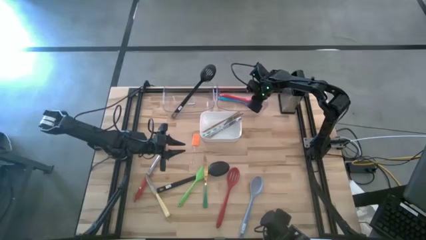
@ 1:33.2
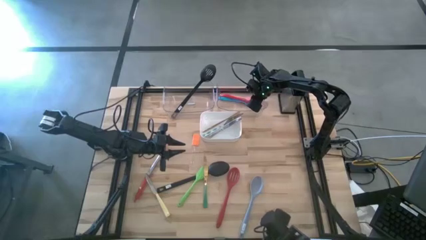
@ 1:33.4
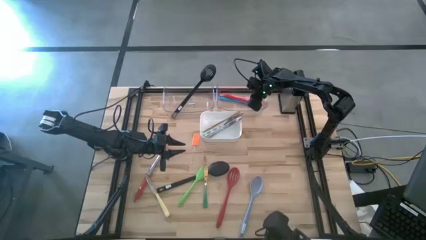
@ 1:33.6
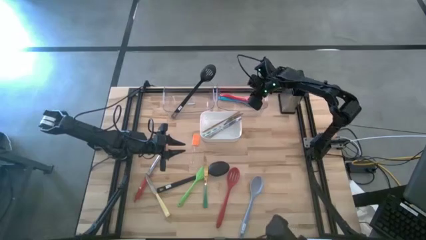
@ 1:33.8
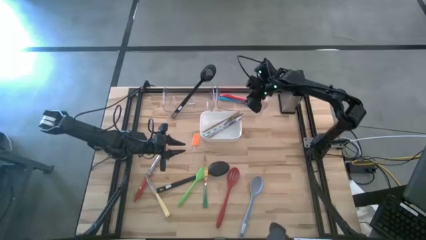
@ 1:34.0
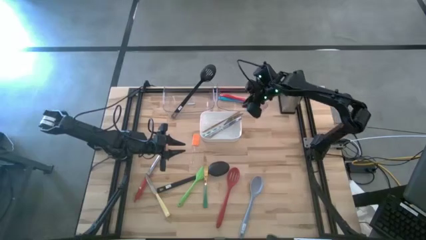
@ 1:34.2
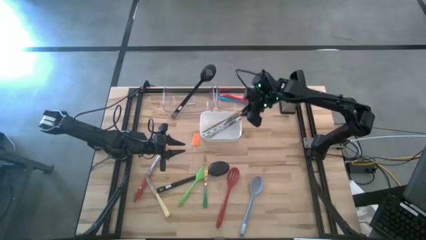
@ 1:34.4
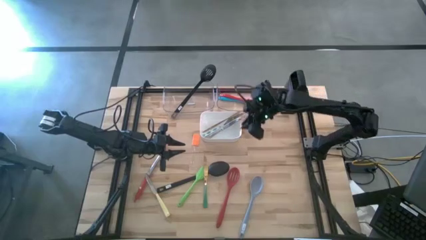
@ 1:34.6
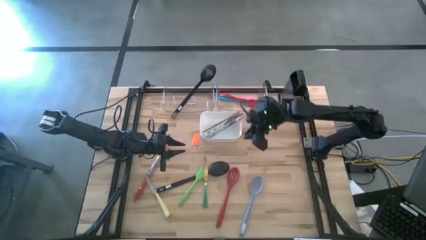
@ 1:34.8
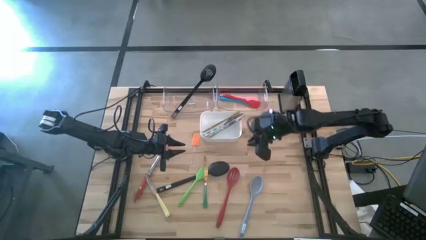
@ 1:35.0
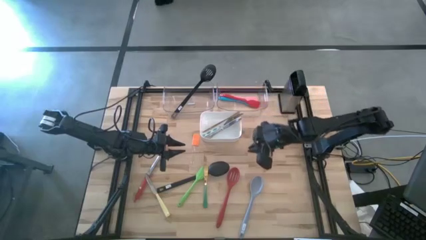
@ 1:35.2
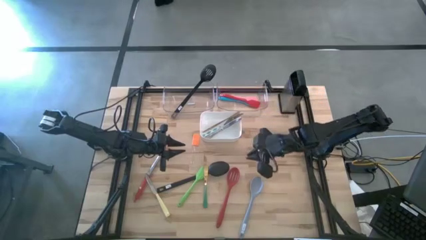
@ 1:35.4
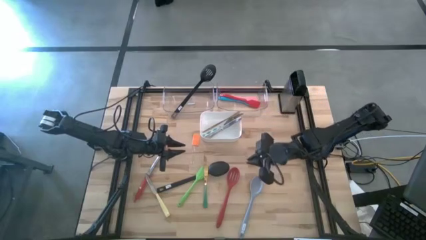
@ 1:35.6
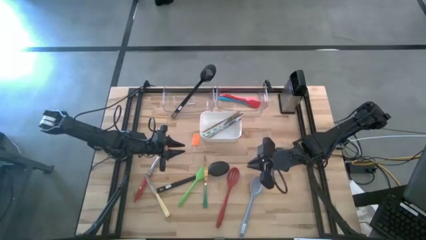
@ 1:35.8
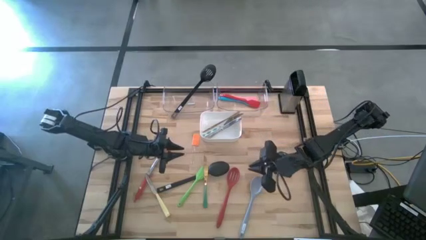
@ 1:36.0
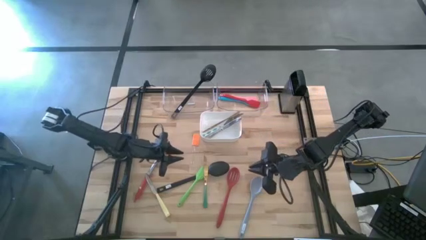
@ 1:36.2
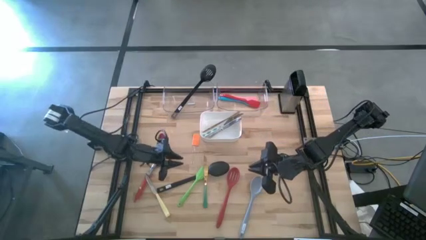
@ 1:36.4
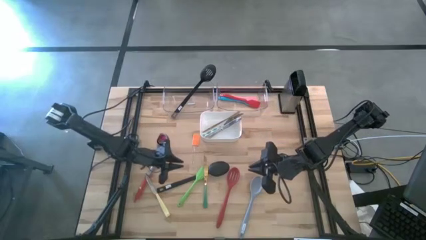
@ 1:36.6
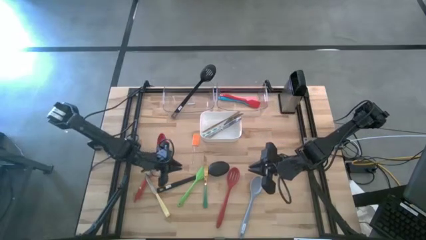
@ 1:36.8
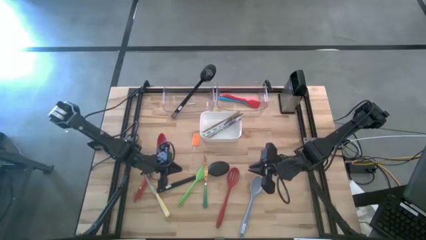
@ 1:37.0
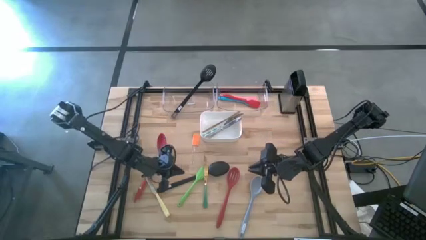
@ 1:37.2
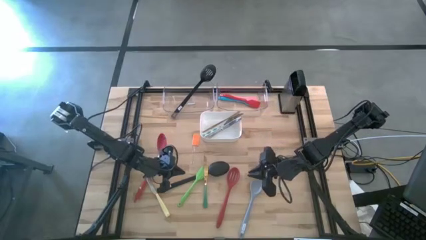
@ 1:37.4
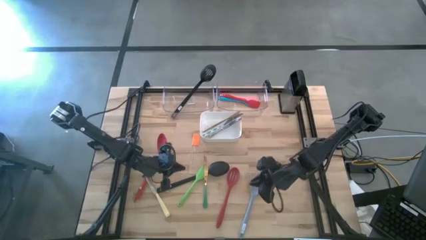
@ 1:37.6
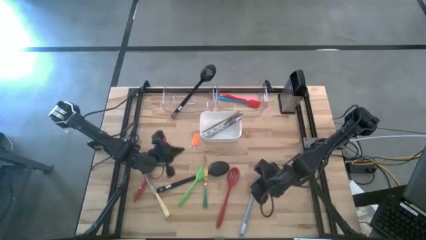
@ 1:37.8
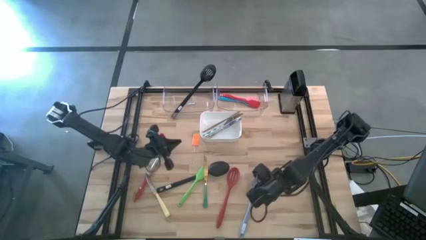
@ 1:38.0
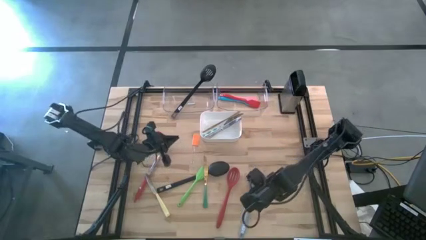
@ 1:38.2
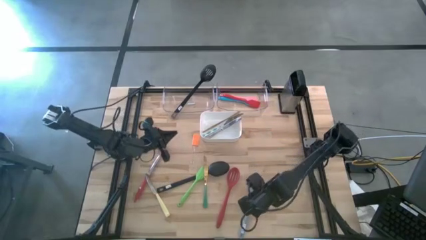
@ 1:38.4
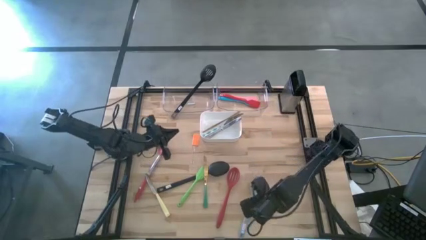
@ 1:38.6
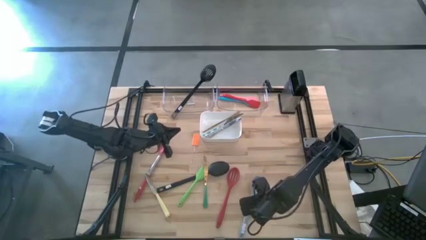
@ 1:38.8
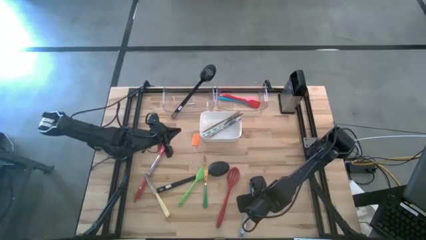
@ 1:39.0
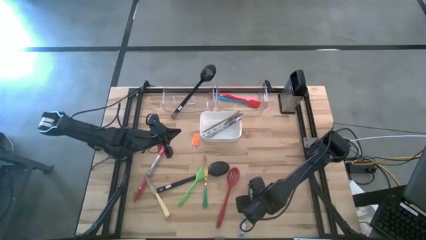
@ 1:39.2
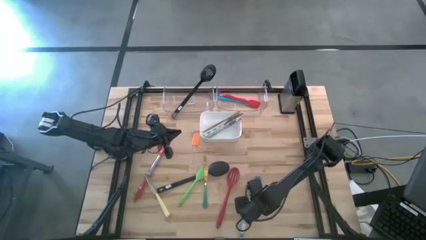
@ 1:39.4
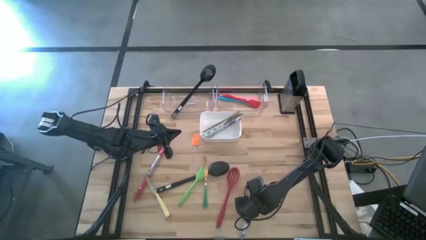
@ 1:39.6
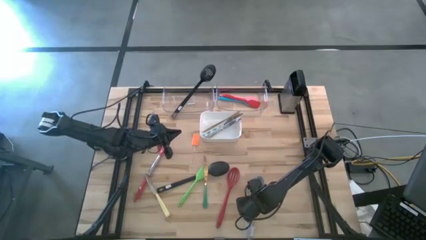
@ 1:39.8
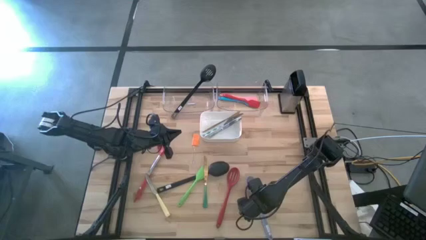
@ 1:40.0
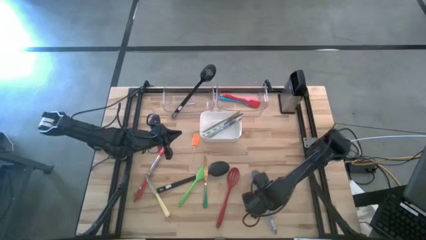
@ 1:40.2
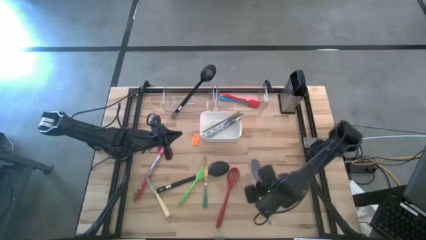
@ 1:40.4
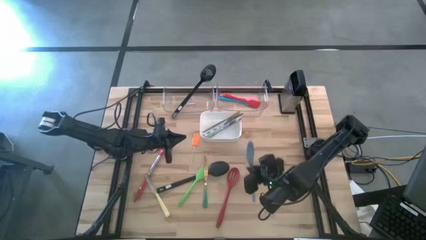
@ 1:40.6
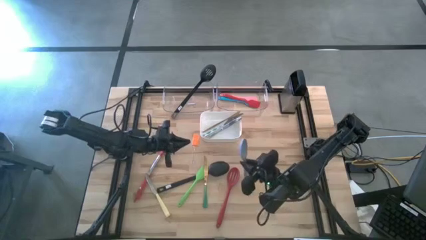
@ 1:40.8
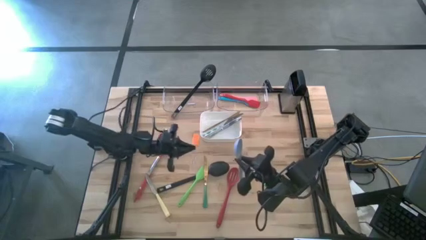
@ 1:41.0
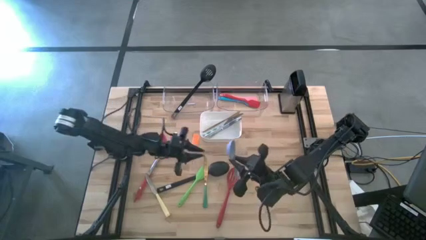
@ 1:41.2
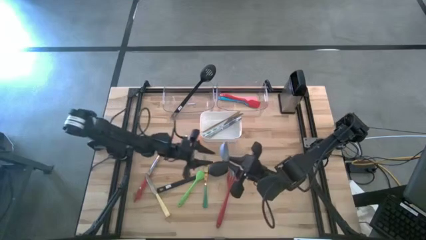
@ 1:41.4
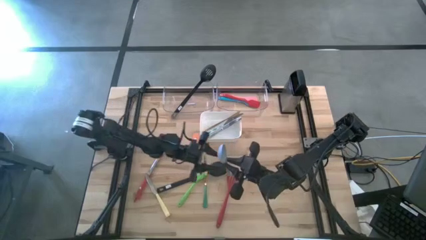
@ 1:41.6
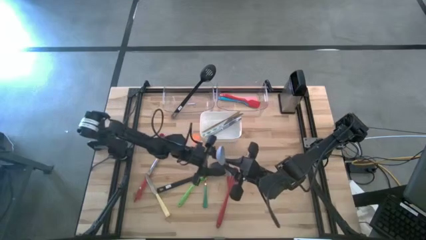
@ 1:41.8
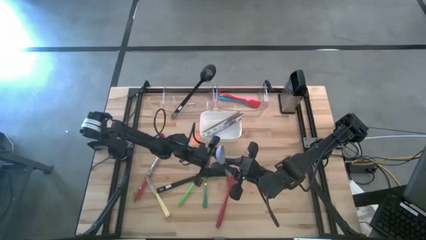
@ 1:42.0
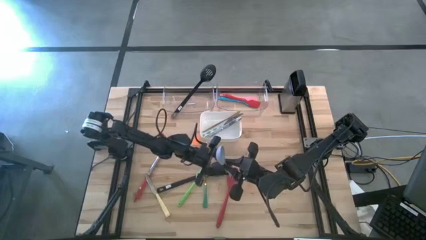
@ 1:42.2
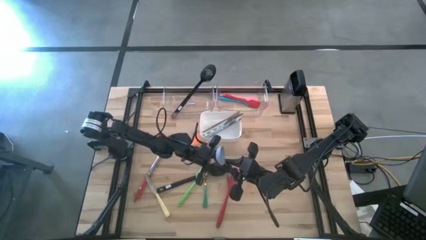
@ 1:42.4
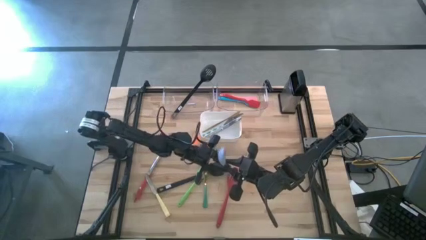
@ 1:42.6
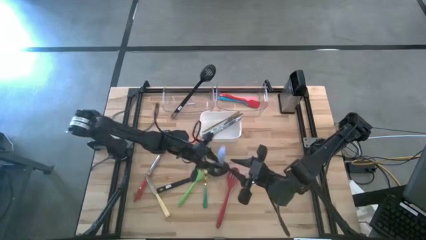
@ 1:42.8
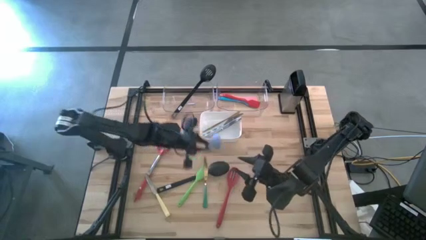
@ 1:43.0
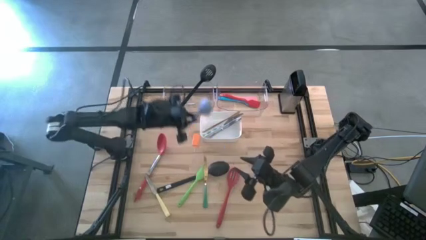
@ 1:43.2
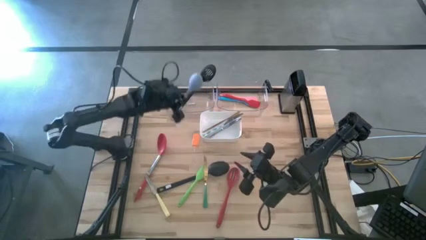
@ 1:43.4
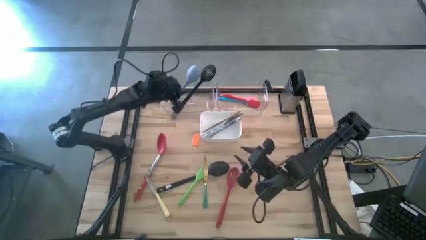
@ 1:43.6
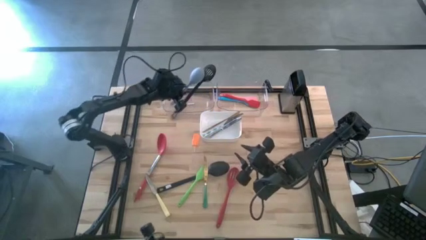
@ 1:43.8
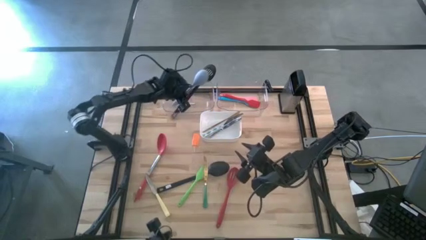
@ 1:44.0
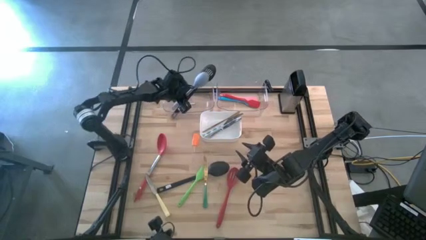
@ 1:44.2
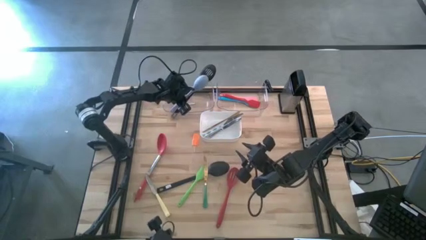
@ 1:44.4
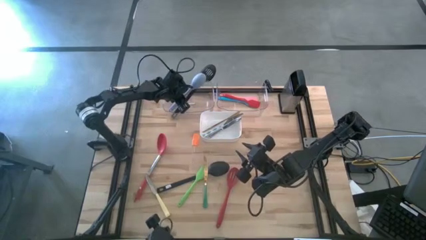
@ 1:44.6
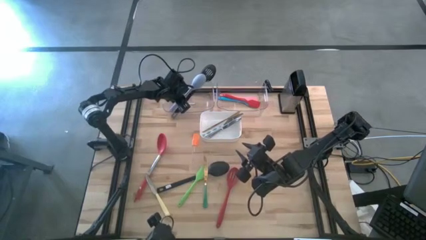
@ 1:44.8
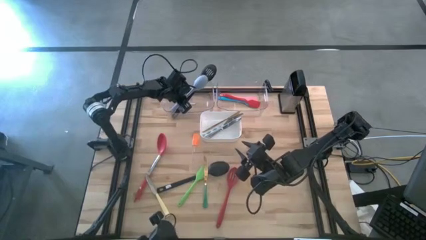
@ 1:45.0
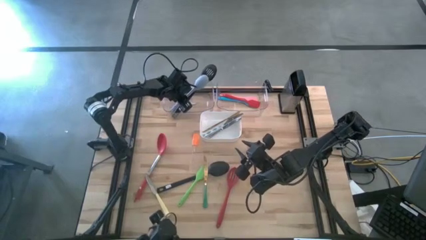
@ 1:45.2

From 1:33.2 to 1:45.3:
Task: Pick & Place Kitchen Items
Put the blue serving spoon into the left transparent bin

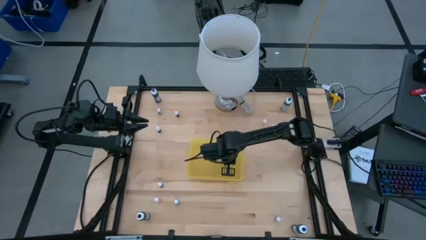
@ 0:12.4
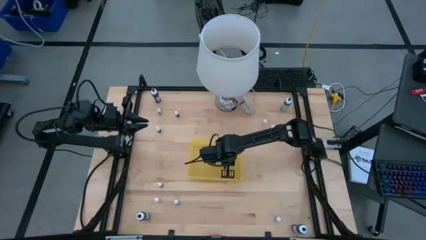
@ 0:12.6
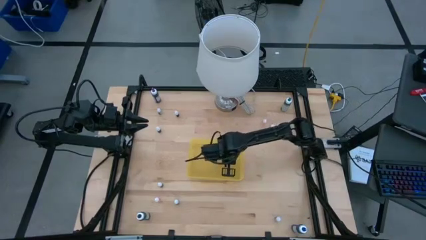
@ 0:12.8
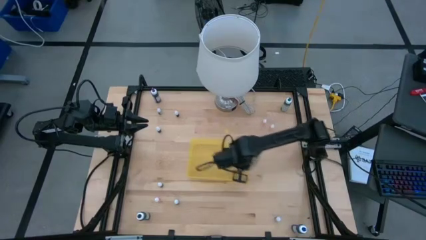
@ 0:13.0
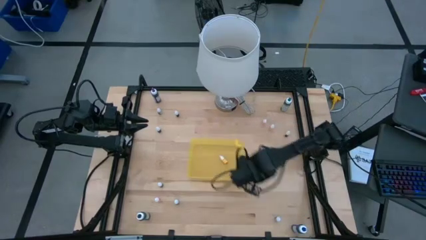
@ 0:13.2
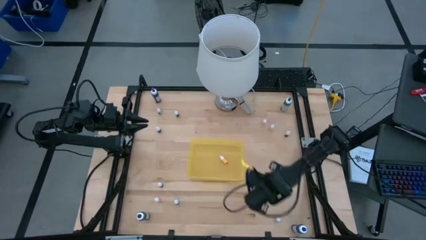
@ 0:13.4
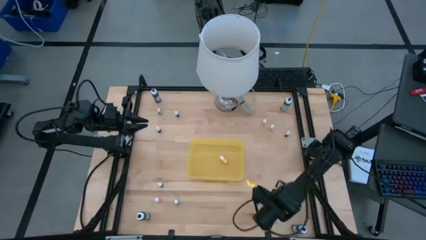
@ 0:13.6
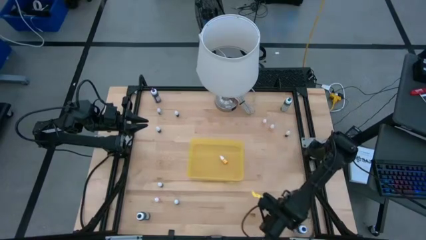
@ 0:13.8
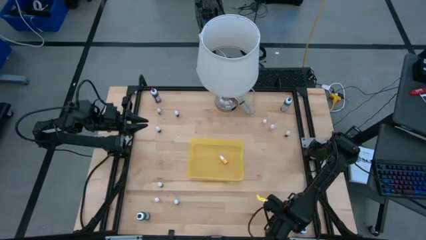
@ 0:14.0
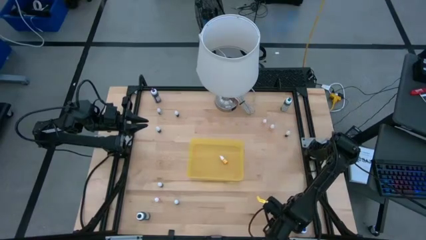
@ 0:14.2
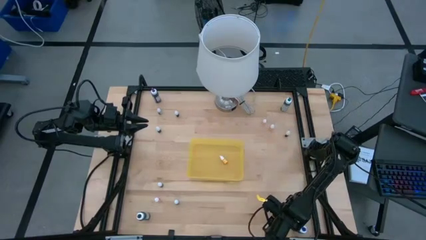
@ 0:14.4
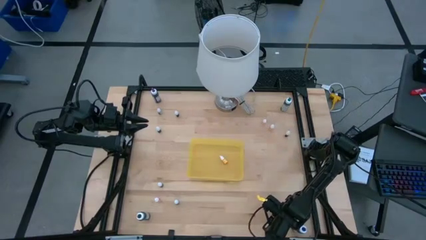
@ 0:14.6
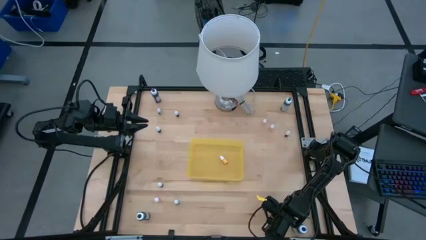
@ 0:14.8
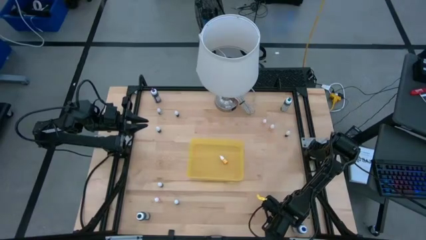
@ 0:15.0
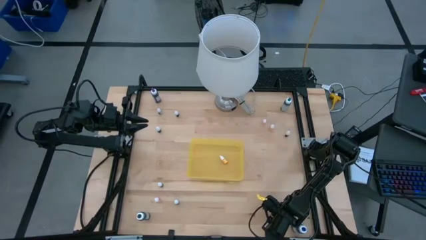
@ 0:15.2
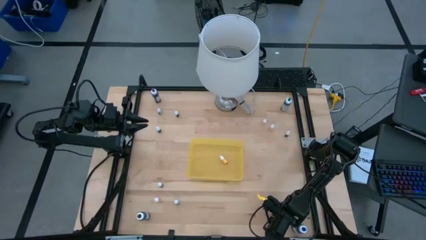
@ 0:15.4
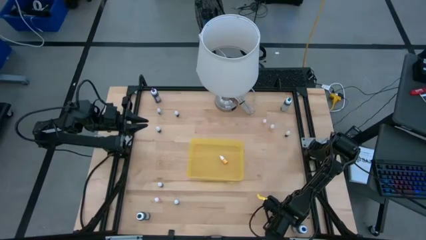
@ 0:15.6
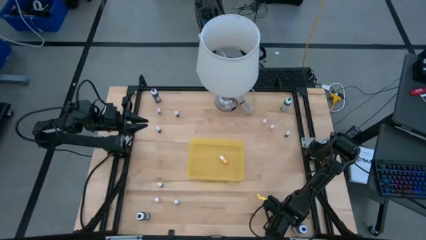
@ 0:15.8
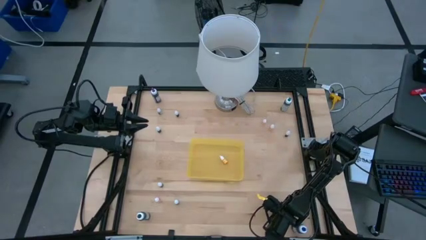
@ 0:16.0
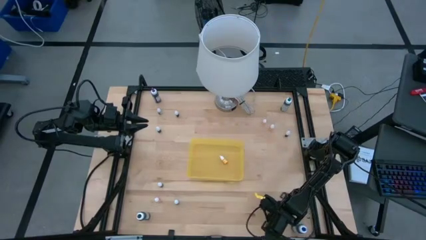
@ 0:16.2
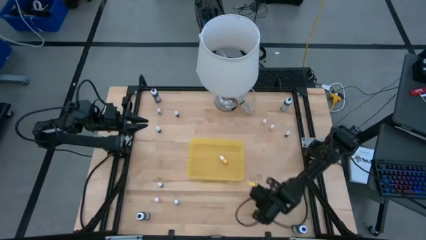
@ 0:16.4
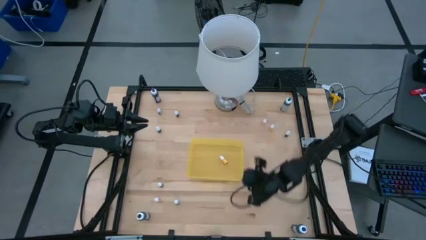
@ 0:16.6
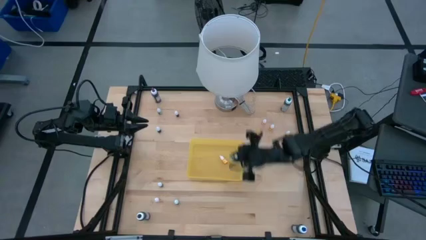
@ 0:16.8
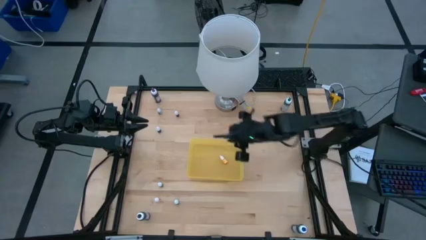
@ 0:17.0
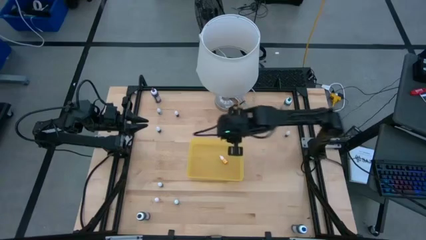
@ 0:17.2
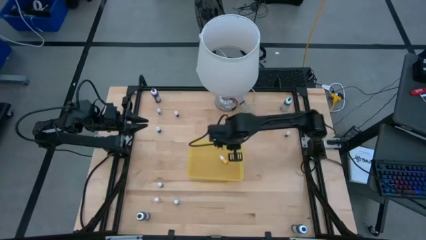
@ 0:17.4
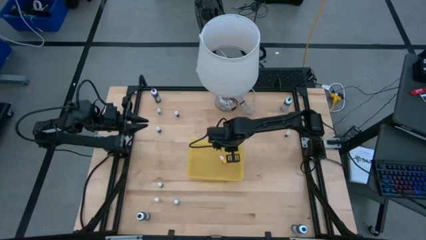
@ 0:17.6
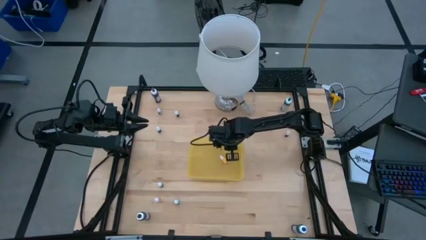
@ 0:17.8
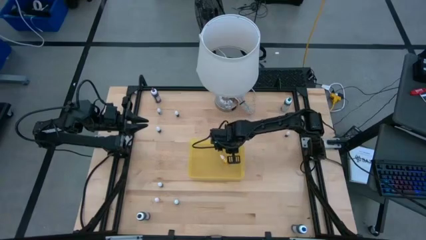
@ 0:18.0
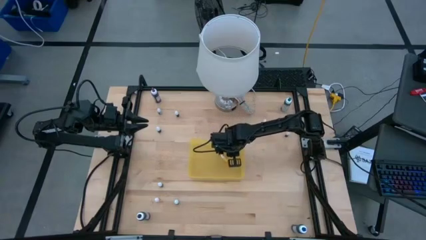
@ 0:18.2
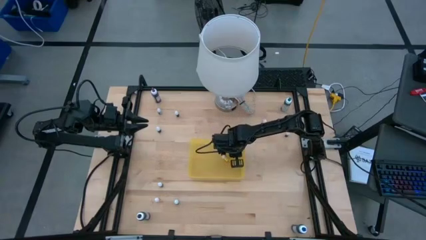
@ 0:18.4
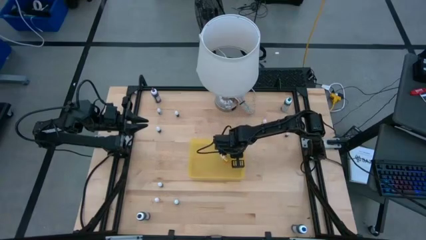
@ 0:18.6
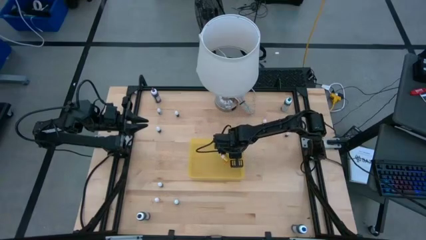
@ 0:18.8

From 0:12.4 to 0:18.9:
Task: Pick & Place food coloring
Put the green food coloring bottle into the yellow bin
